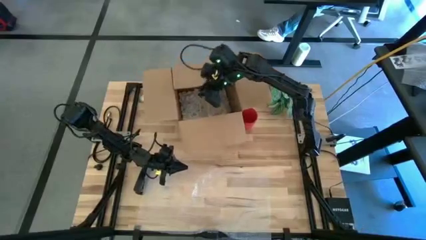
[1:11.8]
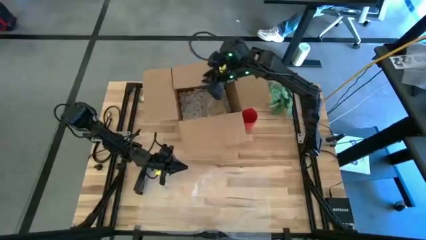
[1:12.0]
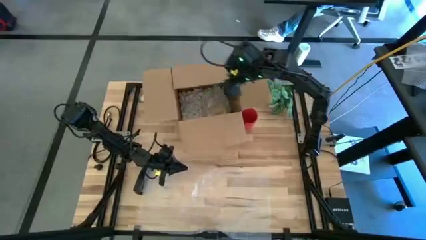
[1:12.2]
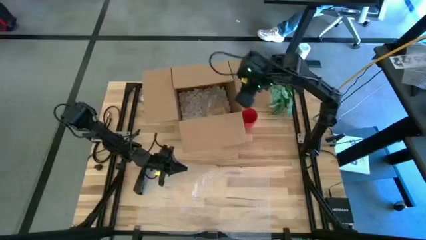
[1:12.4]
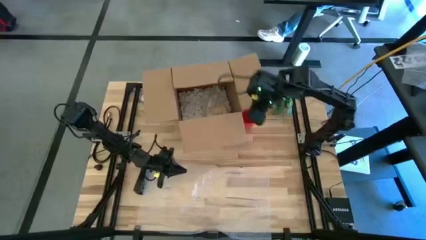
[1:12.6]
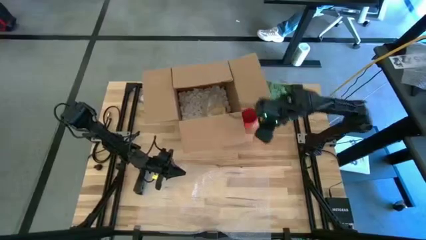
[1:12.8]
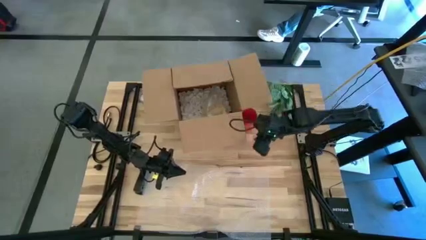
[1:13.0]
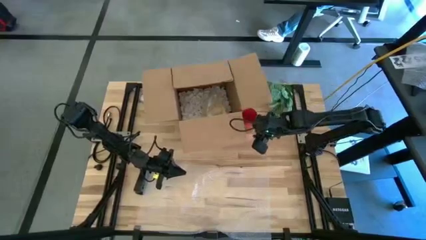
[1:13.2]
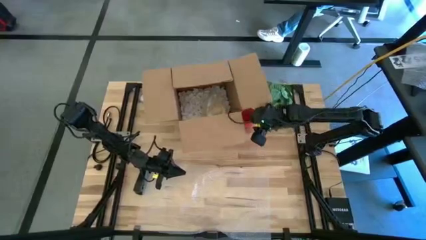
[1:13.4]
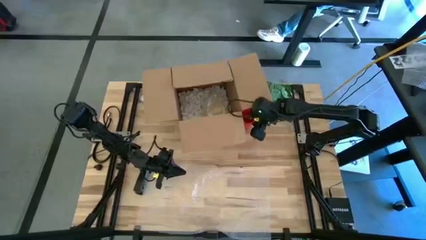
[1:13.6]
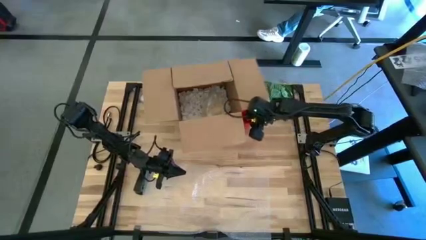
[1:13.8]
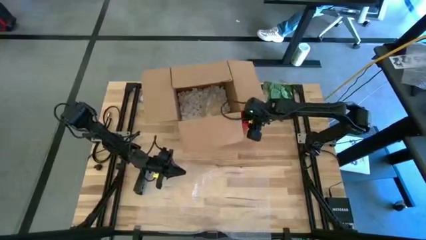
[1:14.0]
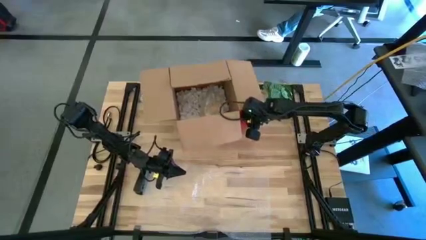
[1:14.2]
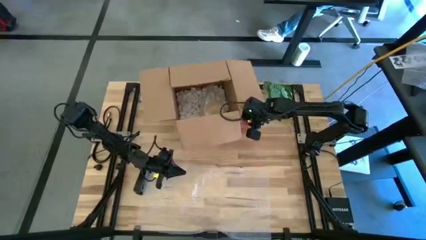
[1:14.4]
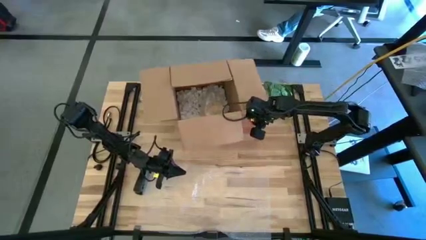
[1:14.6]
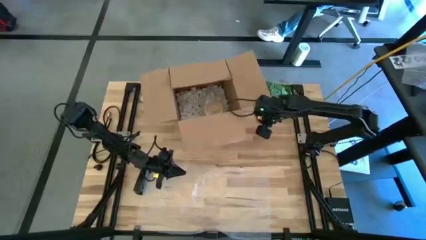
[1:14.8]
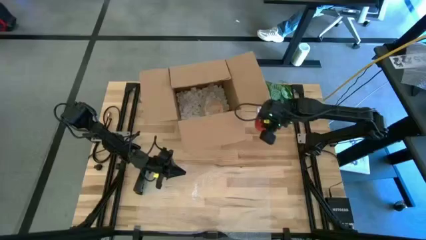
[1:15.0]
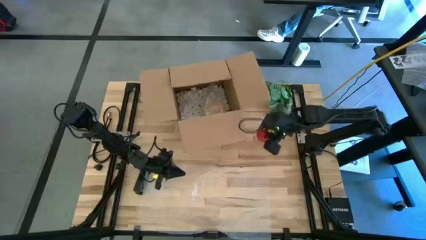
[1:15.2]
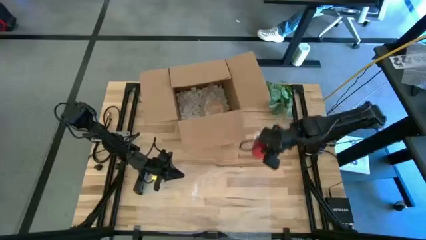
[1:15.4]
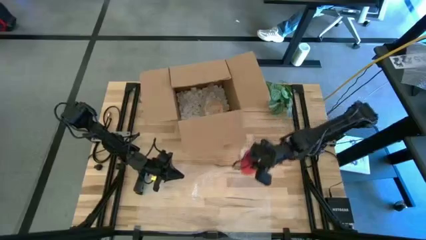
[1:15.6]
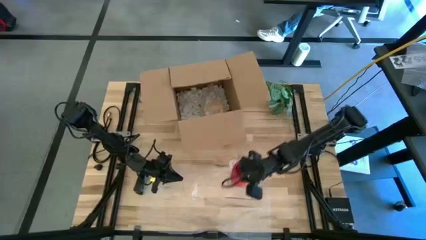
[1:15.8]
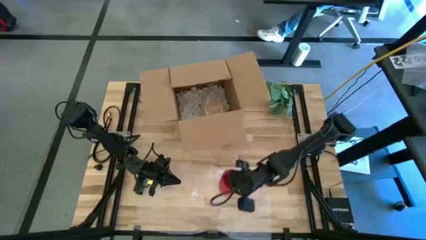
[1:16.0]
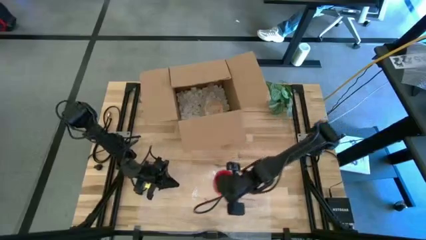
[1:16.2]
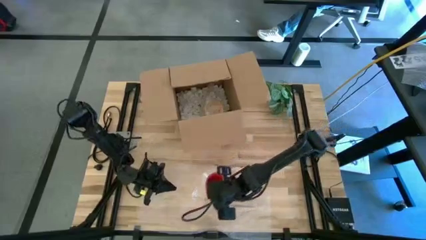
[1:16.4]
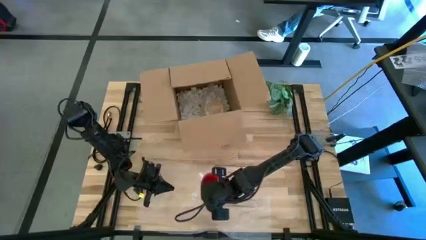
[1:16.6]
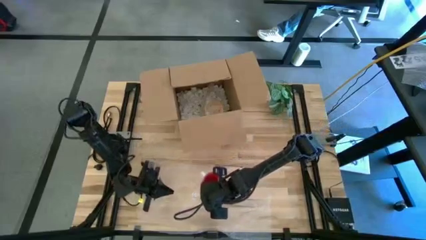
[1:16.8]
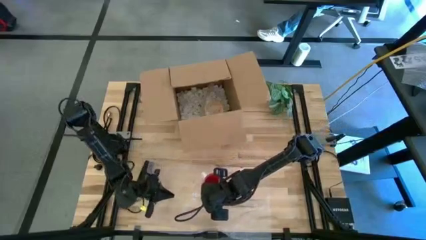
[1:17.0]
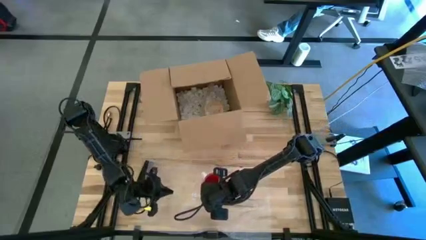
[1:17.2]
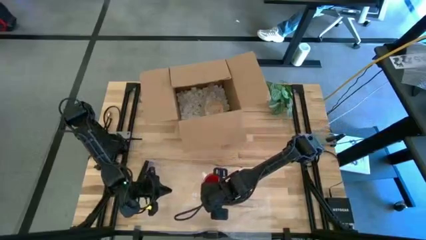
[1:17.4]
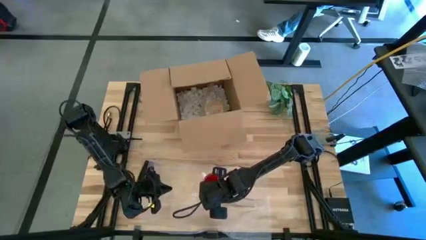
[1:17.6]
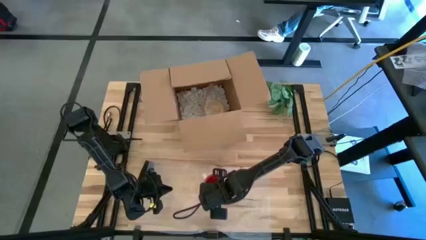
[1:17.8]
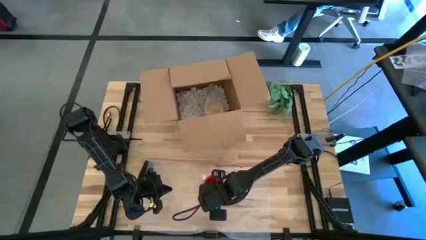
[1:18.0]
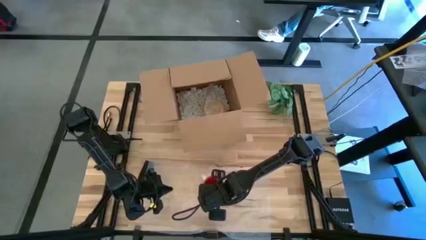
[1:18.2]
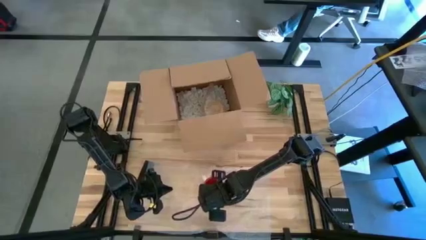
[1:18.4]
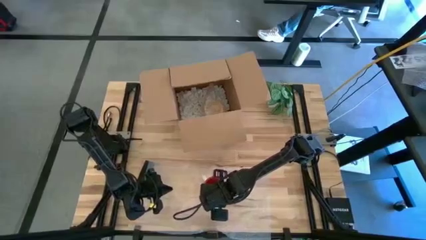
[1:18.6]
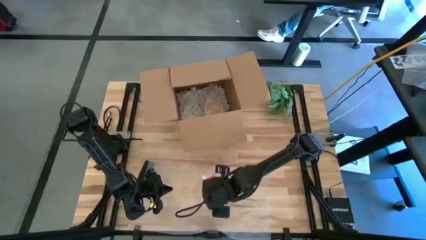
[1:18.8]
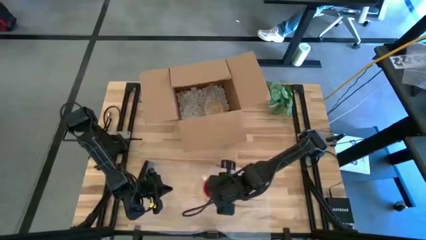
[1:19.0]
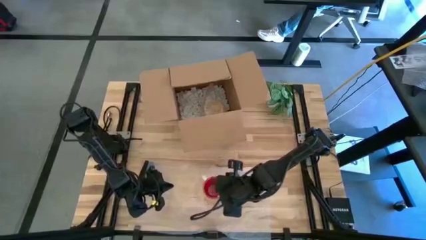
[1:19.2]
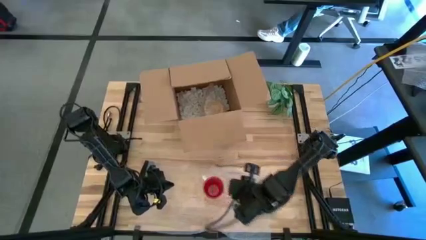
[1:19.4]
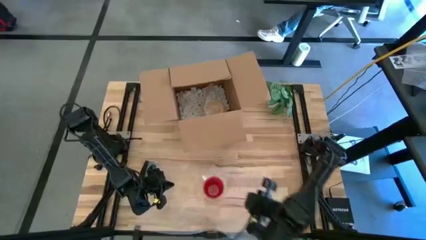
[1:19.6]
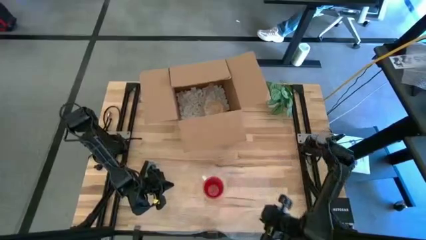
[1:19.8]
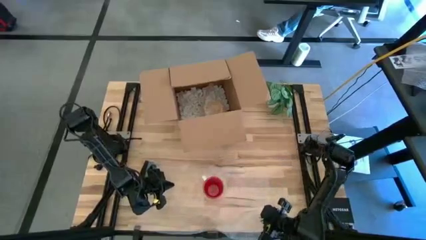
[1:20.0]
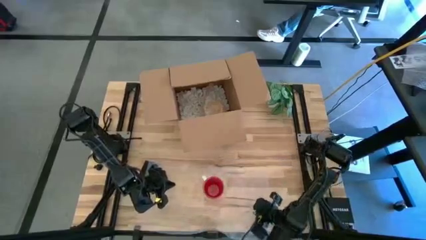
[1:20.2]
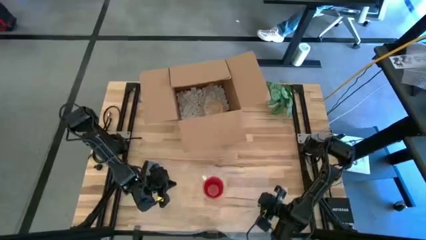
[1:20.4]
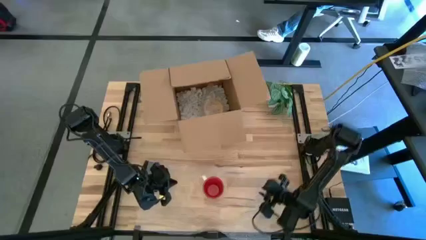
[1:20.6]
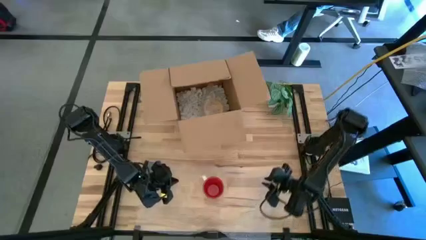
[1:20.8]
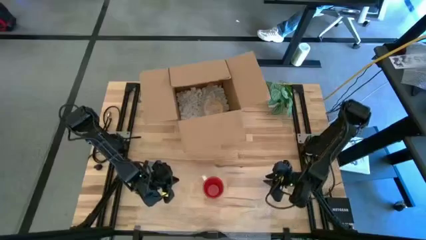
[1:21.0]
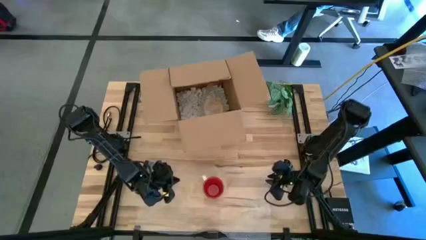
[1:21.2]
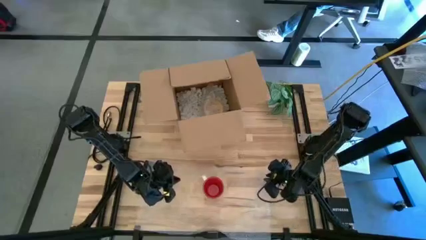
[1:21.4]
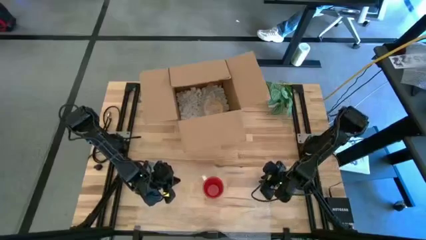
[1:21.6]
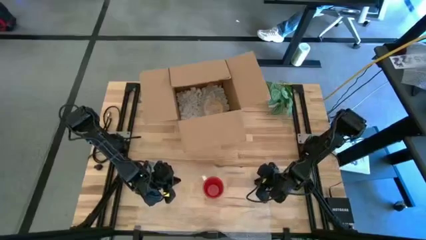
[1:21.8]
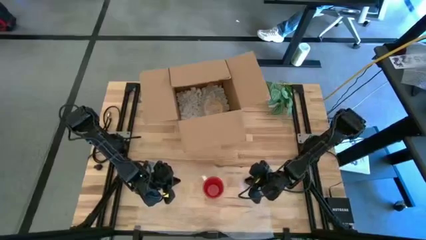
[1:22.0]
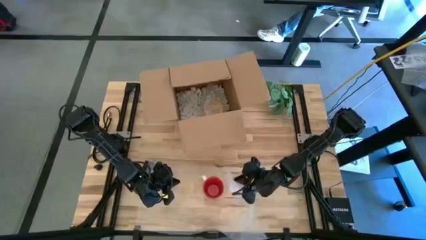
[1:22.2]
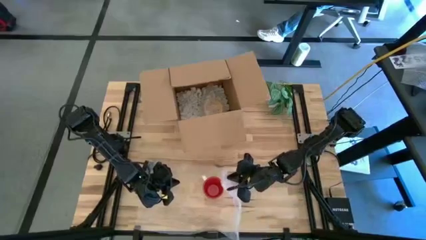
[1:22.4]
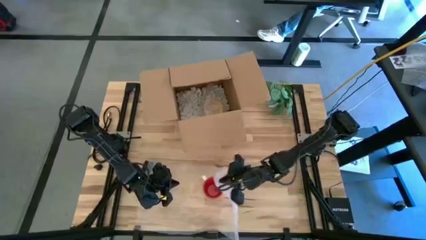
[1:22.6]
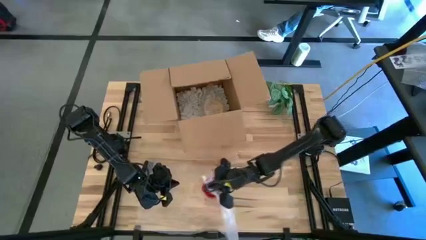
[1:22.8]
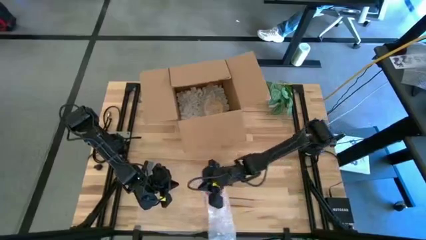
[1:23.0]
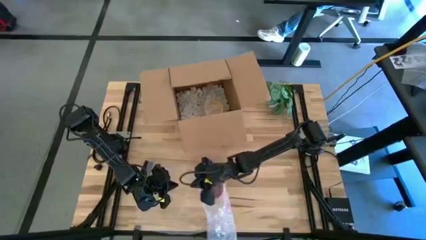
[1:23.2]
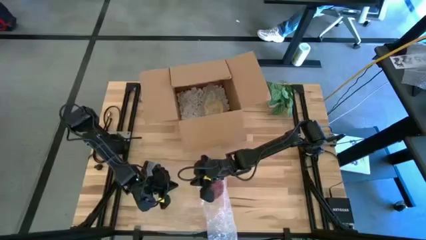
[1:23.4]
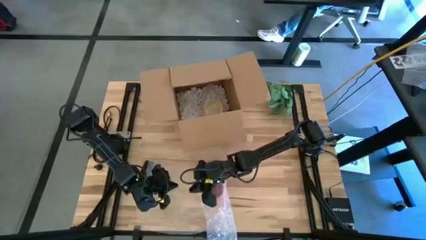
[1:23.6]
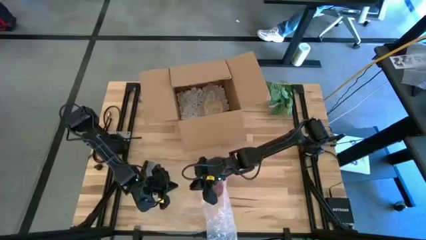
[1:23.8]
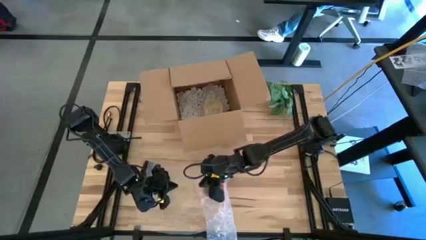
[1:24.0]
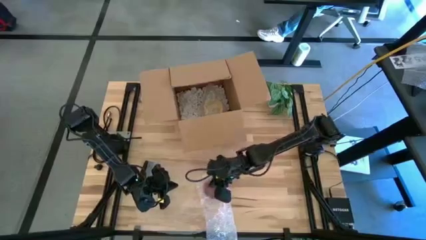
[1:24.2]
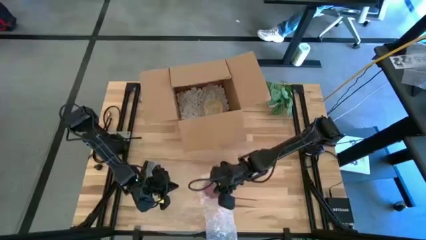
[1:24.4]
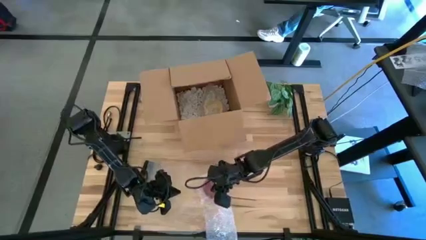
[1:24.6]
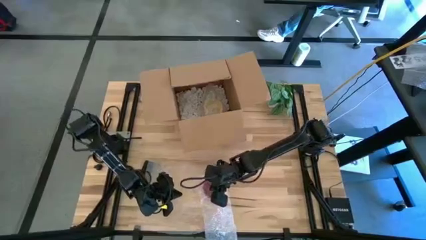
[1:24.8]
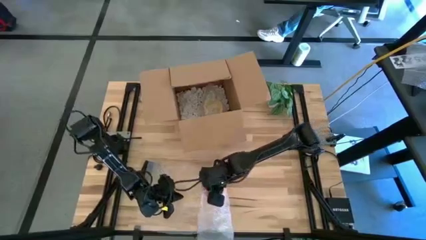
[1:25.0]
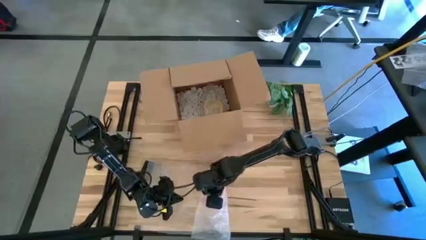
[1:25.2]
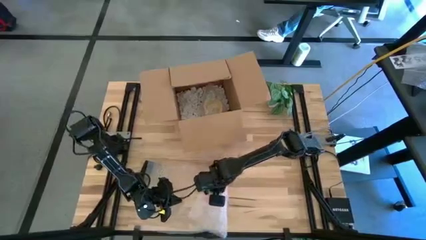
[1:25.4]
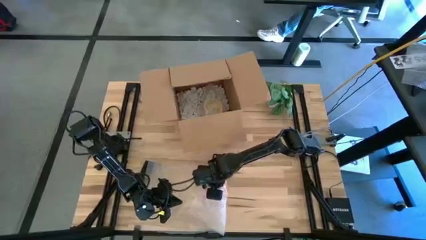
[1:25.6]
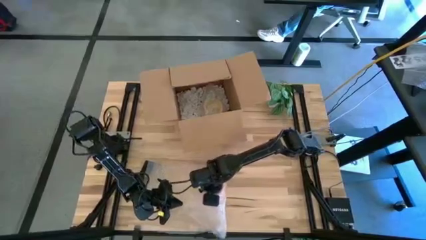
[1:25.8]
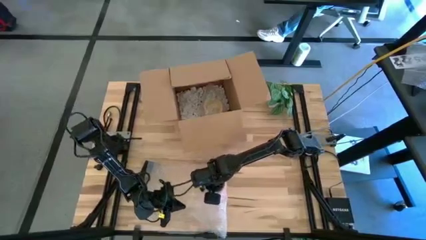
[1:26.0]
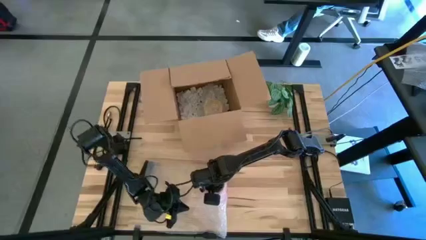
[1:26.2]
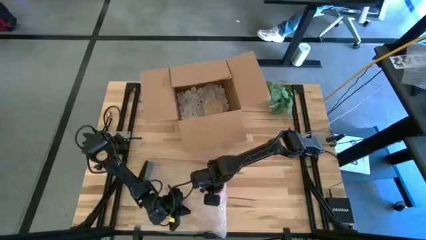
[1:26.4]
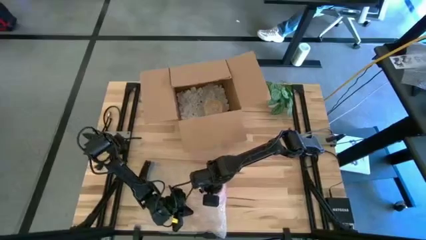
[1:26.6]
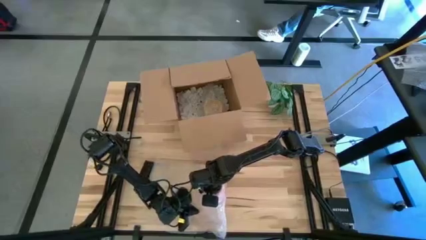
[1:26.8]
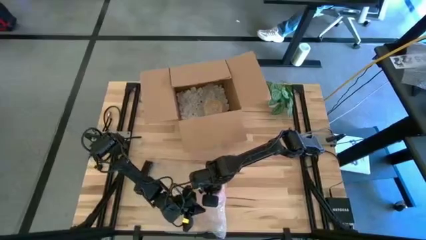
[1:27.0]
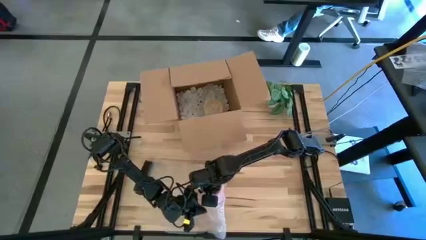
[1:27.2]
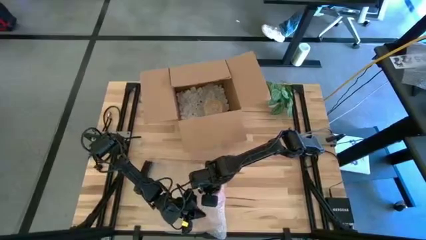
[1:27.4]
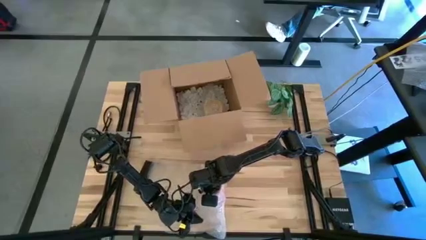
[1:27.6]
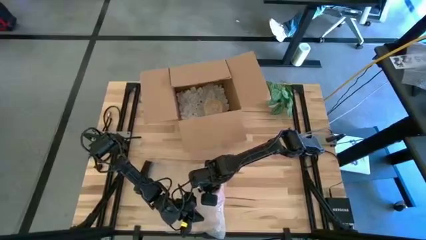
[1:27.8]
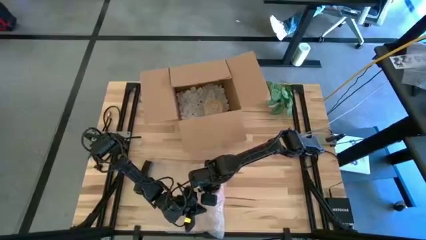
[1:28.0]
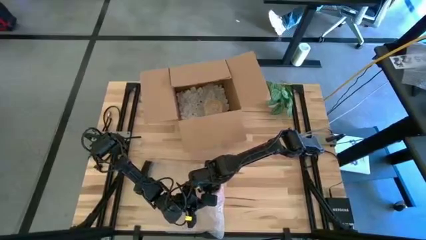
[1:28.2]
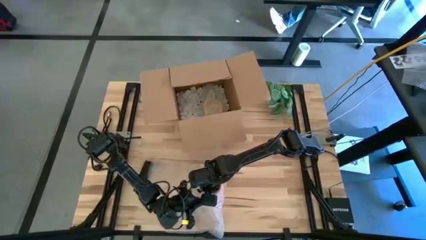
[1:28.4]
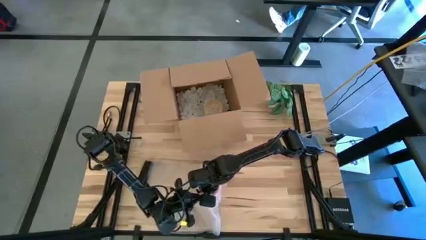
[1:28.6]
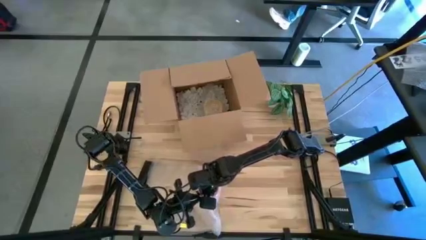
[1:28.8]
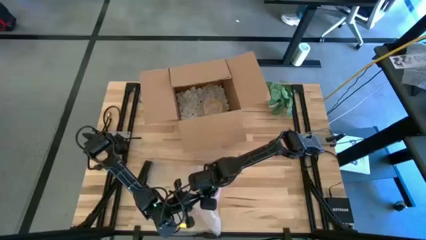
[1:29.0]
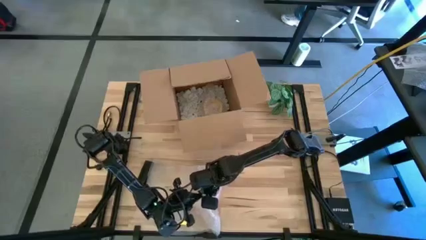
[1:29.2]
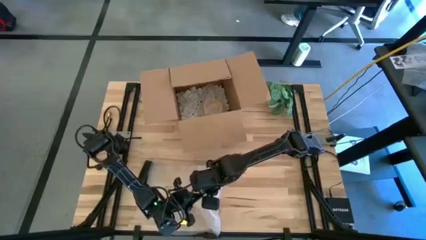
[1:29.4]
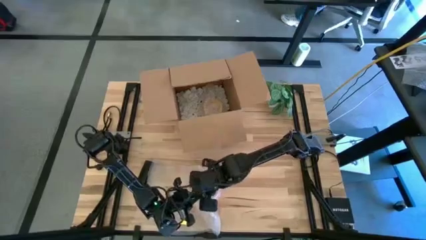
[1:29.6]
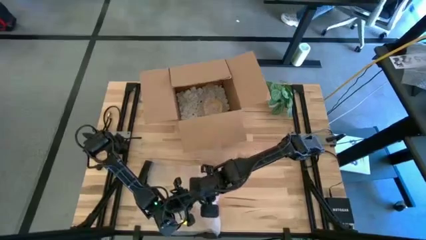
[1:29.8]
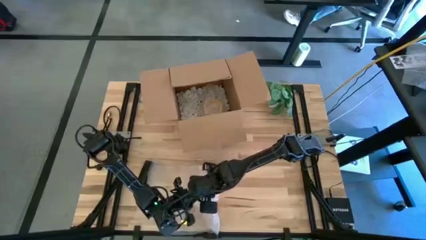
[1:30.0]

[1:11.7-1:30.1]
Task: wrap mug
Wrap the red mug with bubble wrap
